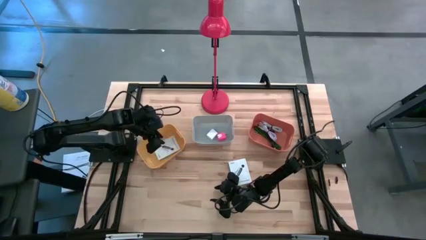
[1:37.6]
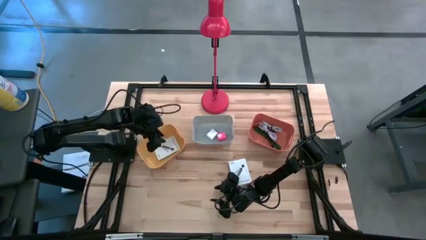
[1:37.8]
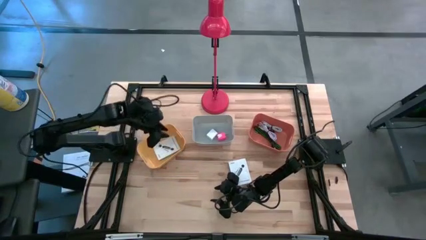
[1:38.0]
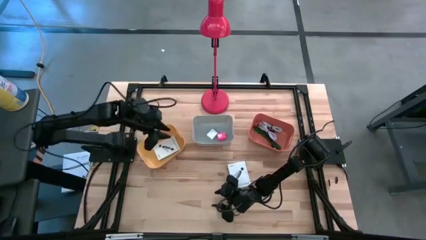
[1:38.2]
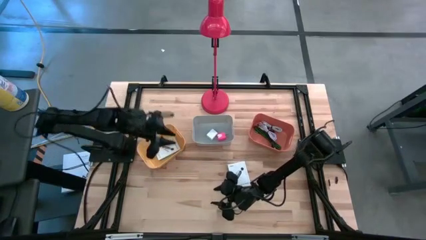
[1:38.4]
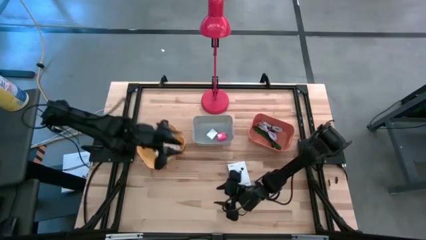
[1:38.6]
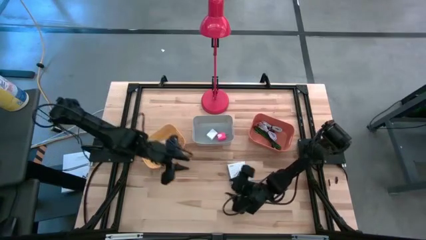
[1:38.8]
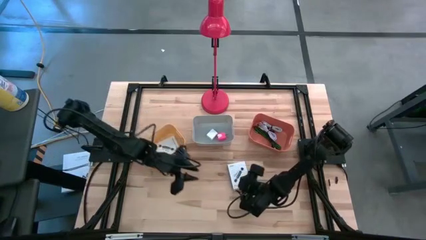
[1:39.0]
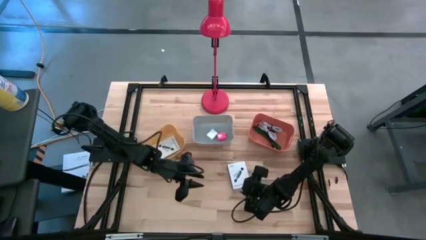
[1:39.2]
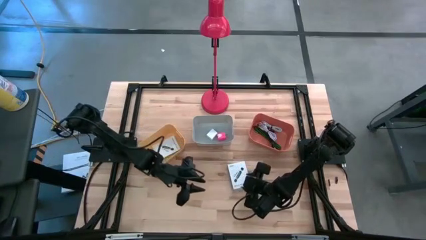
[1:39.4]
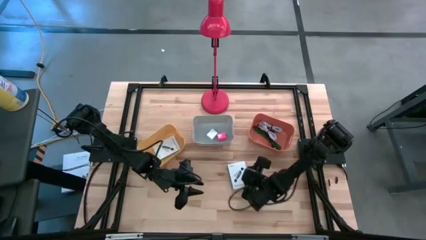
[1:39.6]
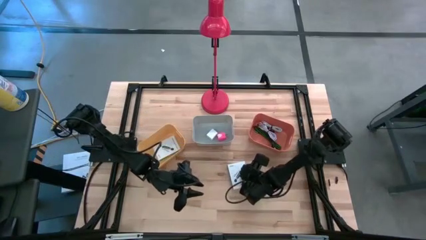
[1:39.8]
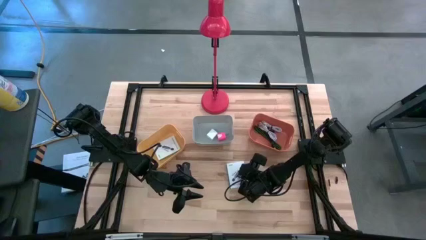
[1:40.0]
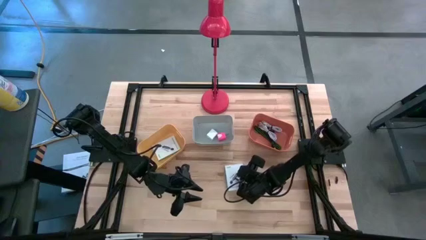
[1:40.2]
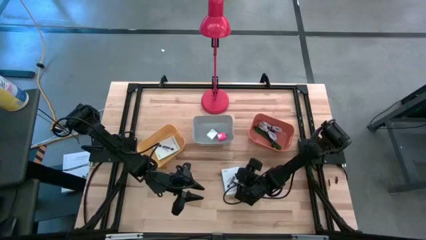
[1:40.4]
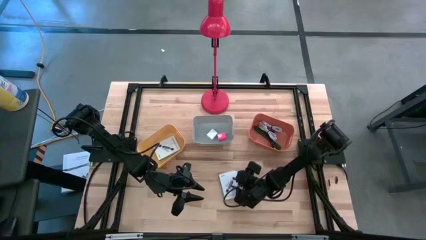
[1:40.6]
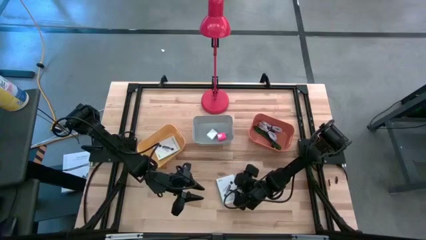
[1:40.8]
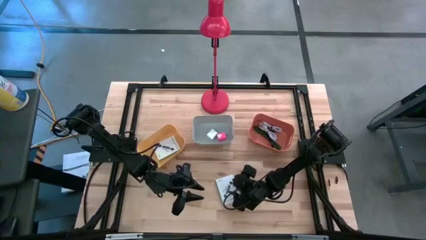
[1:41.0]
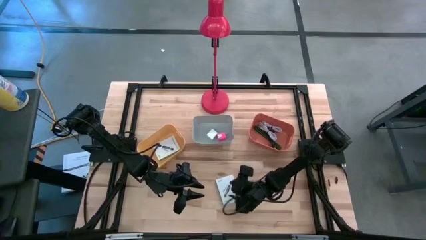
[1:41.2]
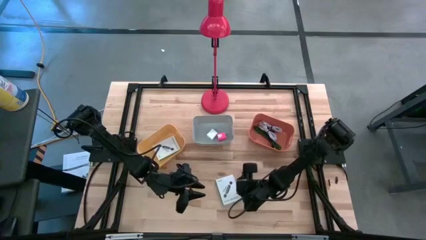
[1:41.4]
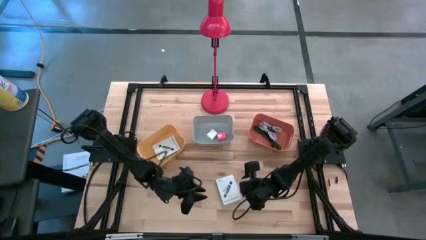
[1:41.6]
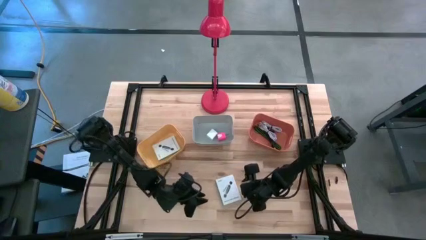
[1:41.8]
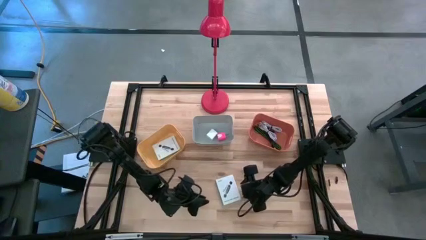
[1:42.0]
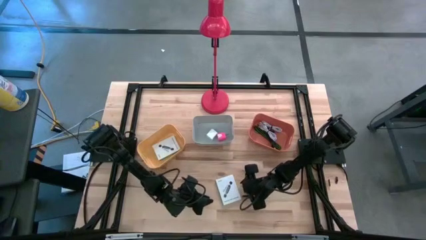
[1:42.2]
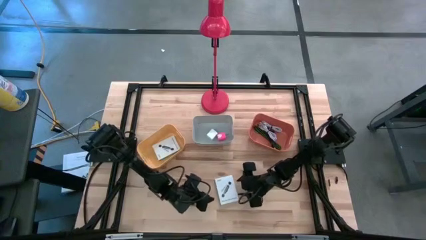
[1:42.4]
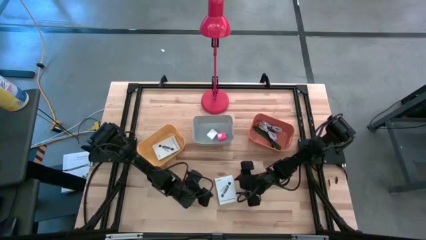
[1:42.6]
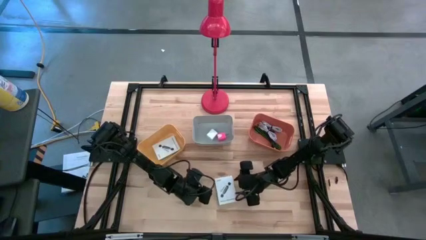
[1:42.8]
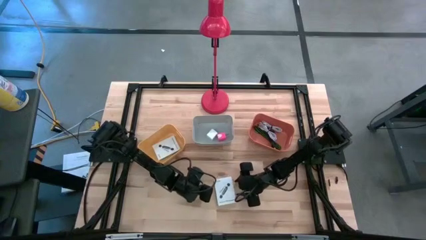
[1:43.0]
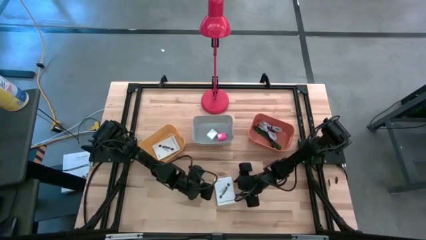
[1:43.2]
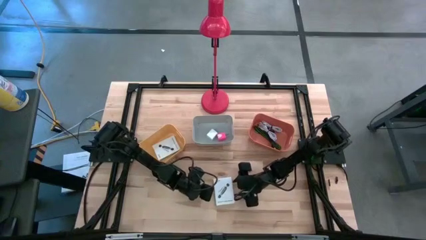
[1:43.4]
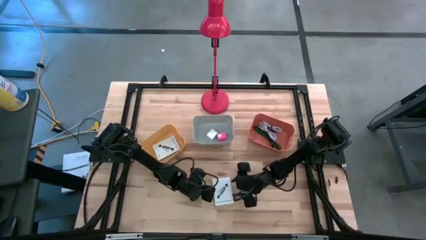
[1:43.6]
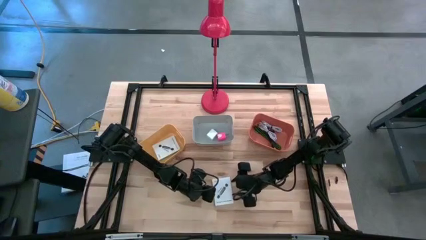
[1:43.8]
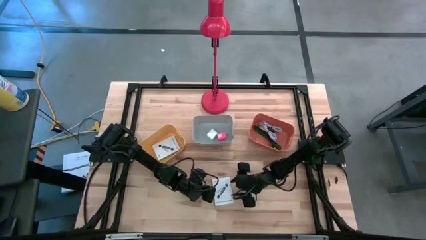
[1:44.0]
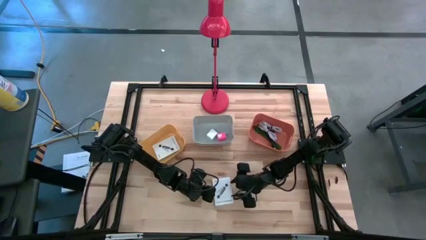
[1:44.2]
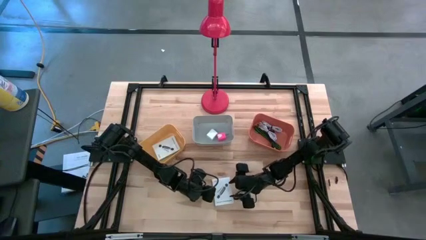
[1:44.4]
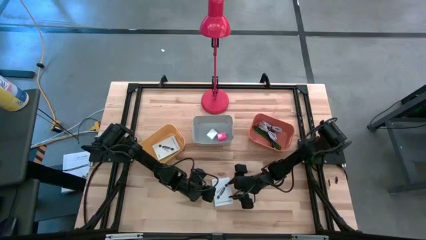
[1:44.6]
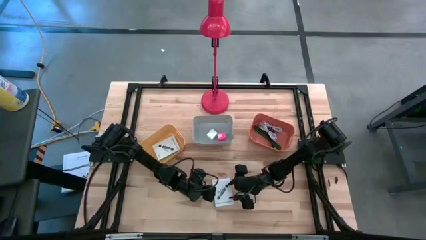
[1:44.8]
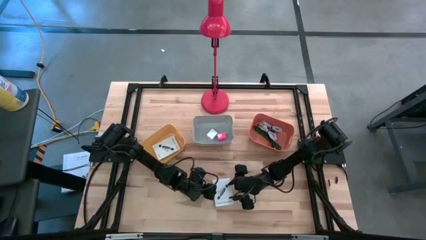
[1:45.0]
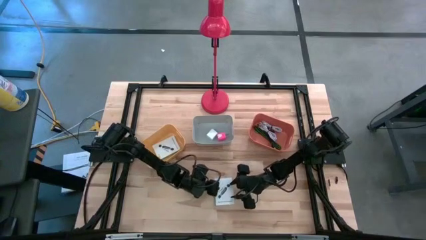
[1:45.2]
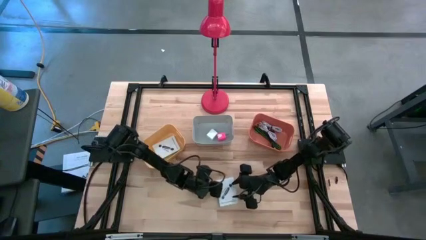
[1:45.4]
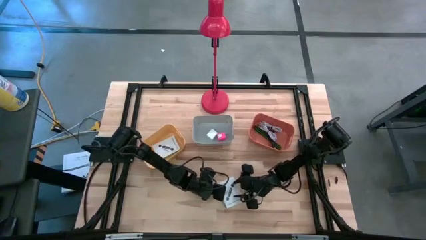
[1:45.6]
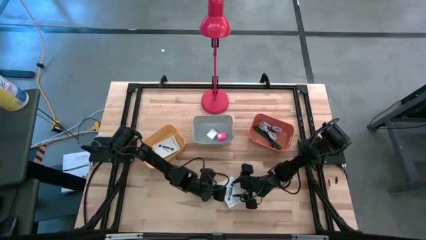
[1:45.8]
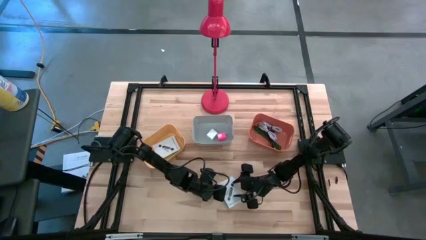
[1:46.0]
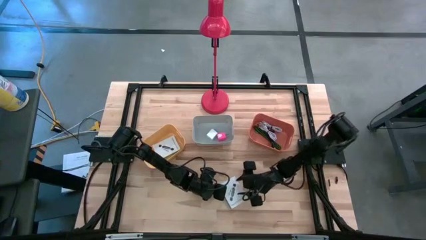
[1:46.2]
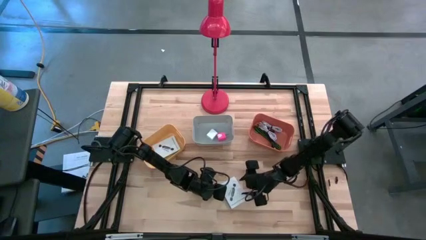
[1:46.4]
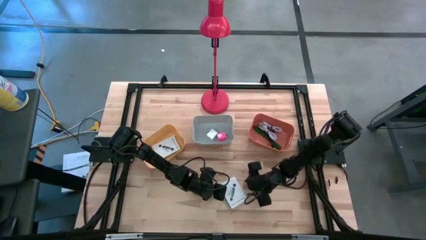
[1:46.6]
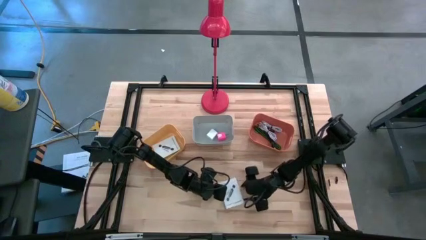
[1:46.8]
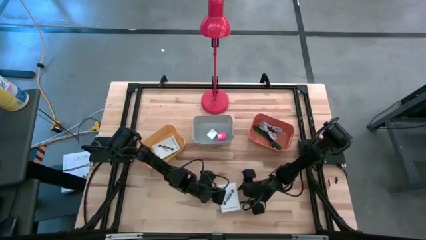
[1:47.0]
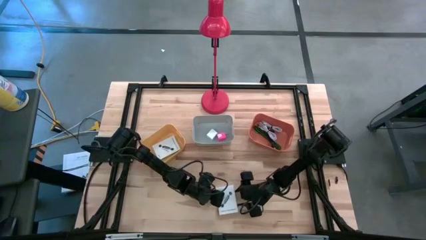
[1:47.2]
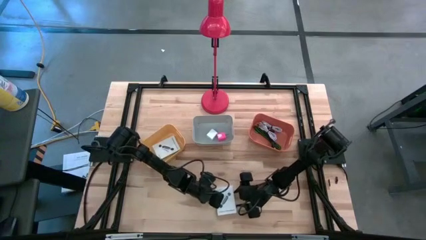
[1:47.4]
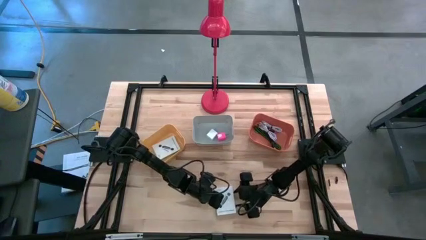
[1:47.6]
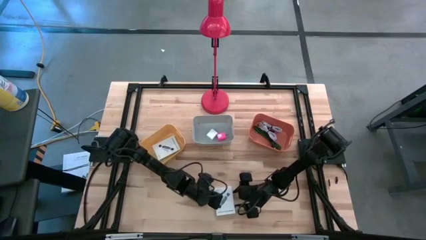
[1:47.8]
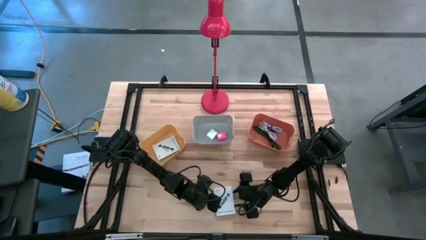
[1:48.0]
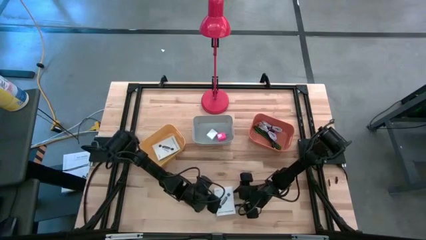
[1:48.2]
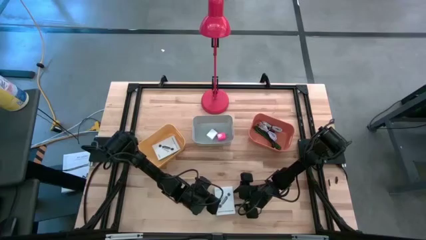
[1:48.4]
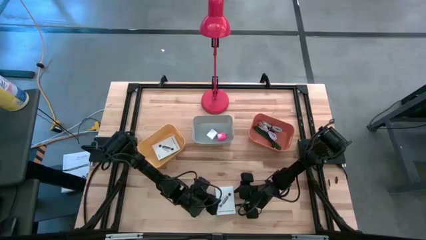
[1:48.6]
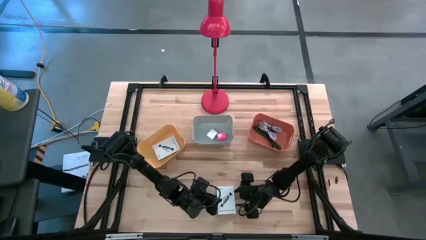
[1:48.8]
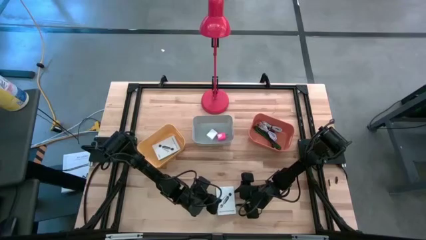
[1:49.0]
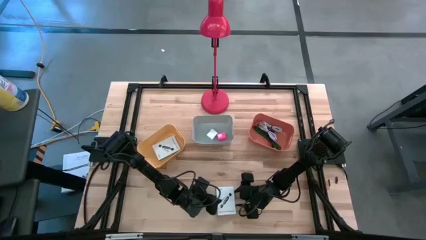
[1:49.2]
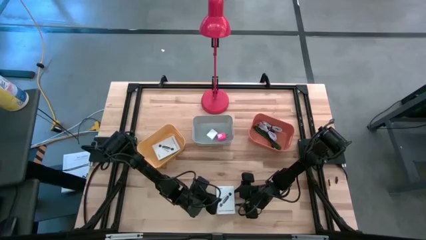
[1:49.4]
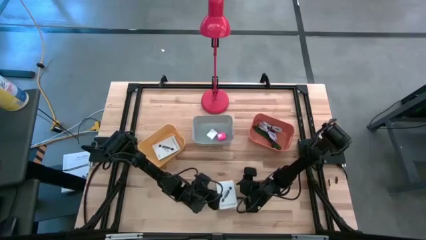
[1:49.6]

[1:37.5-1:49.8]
Task: Pick and place items into bin
Put the white card reader box into the yellow bin
